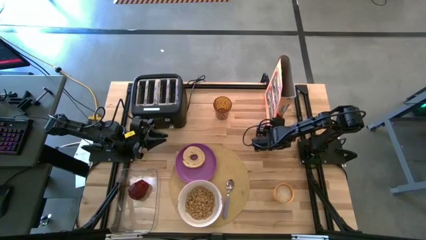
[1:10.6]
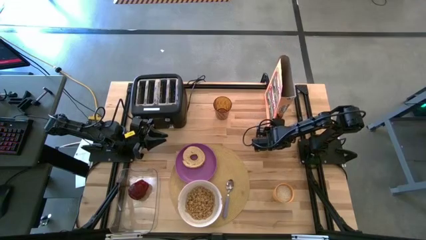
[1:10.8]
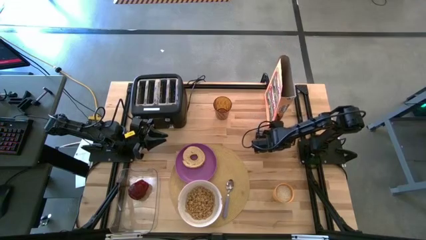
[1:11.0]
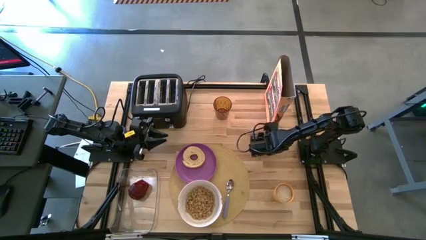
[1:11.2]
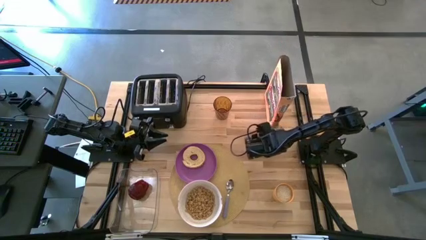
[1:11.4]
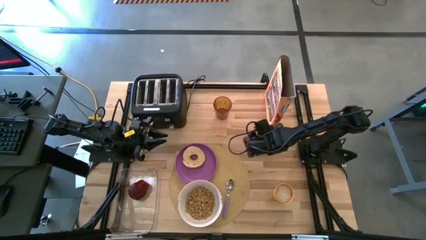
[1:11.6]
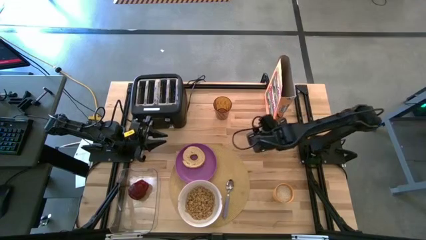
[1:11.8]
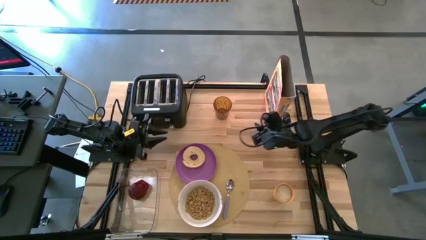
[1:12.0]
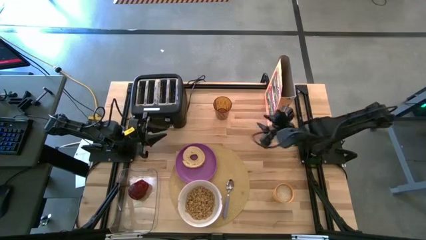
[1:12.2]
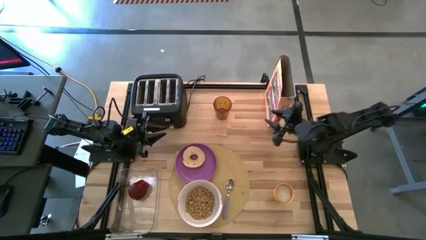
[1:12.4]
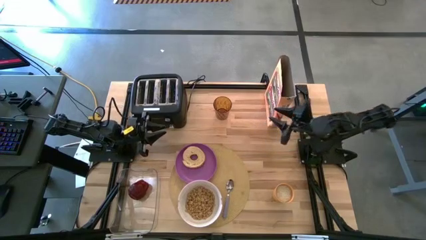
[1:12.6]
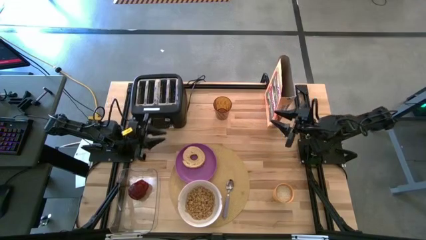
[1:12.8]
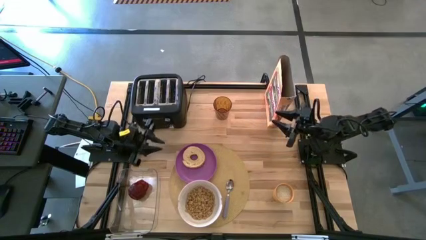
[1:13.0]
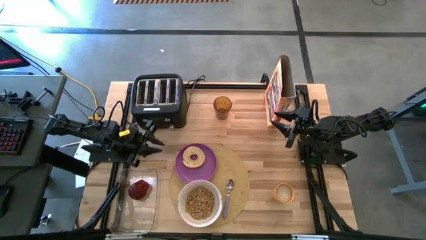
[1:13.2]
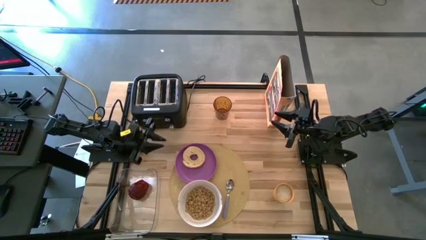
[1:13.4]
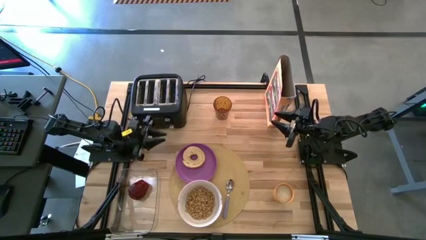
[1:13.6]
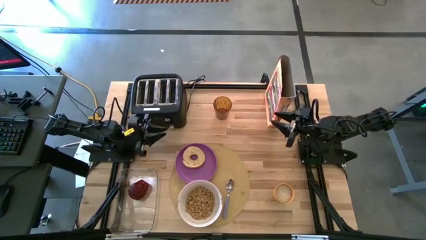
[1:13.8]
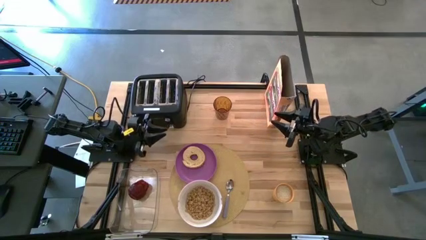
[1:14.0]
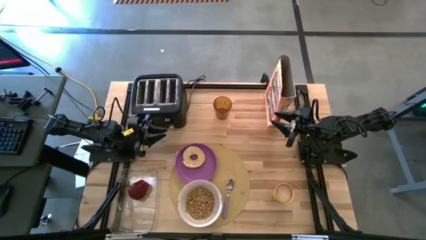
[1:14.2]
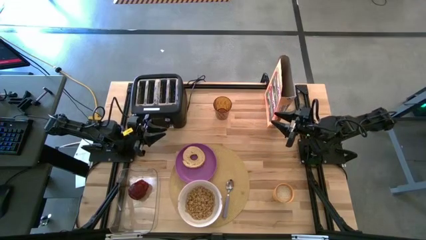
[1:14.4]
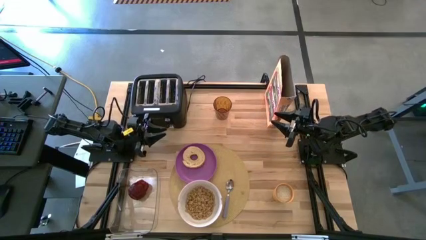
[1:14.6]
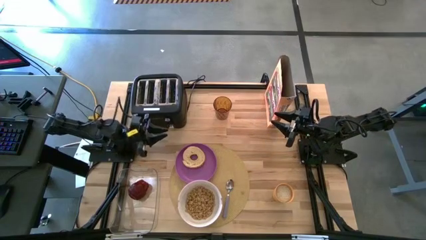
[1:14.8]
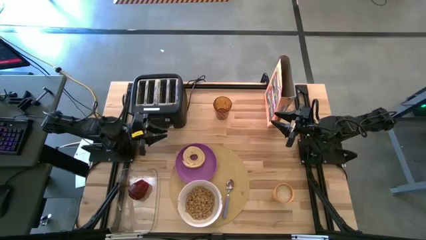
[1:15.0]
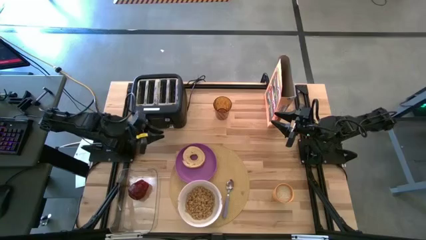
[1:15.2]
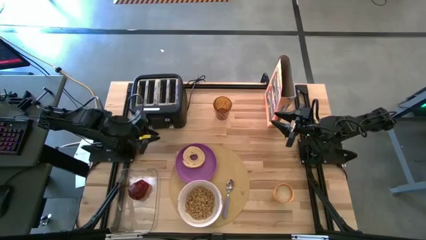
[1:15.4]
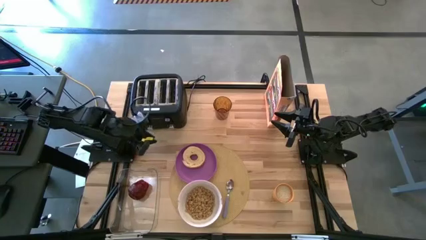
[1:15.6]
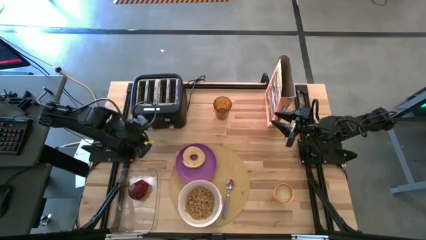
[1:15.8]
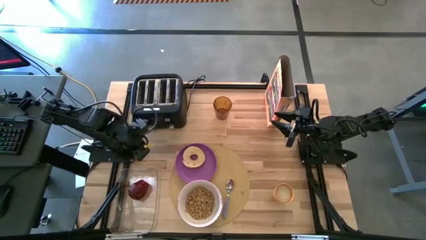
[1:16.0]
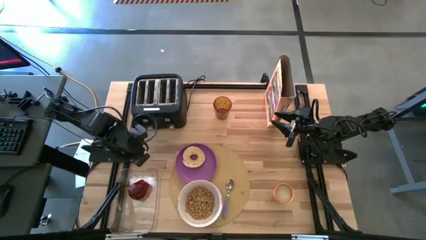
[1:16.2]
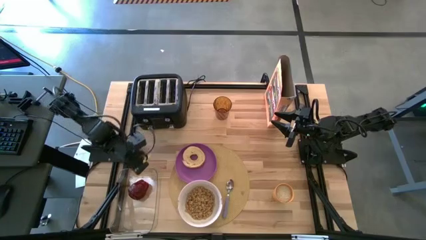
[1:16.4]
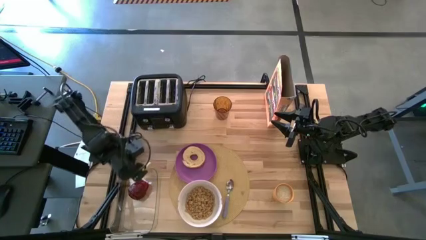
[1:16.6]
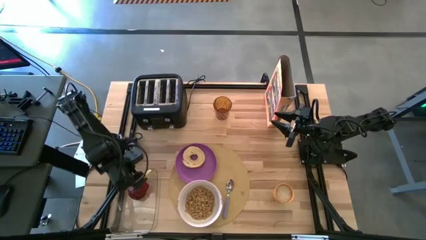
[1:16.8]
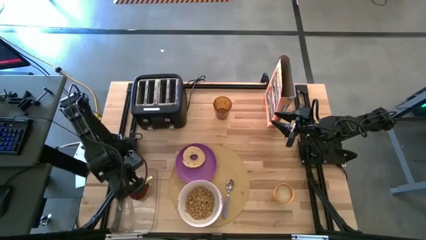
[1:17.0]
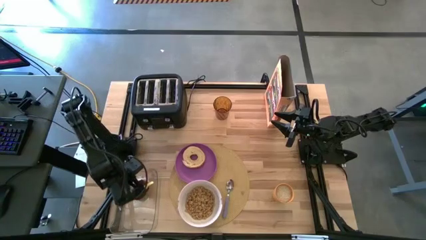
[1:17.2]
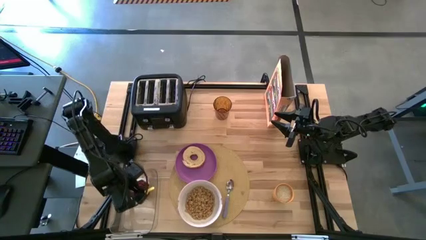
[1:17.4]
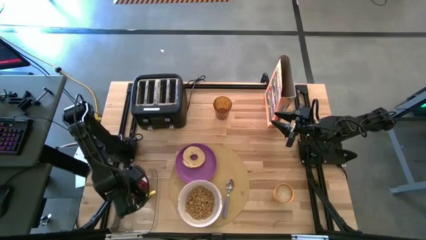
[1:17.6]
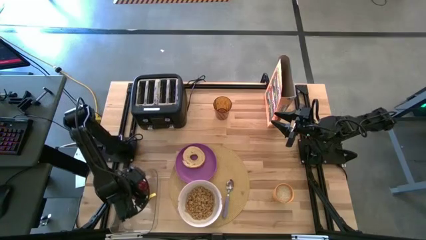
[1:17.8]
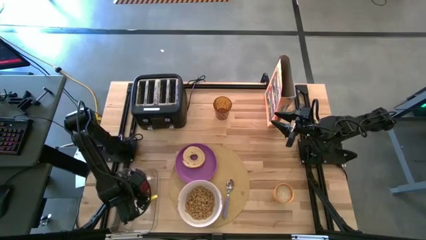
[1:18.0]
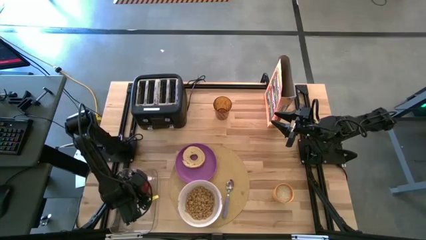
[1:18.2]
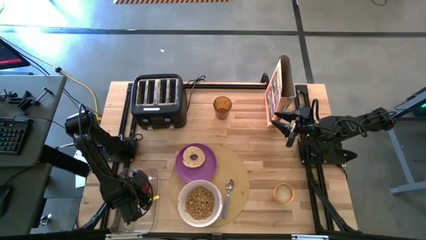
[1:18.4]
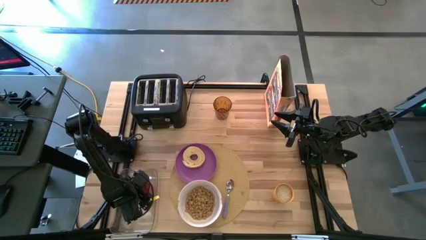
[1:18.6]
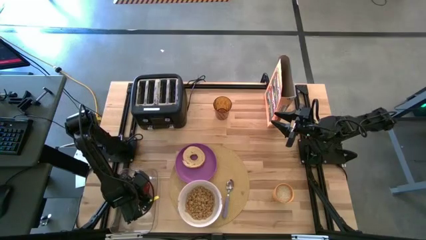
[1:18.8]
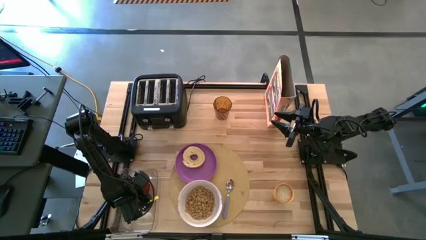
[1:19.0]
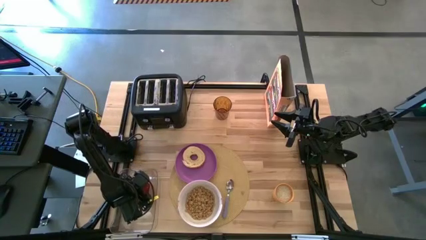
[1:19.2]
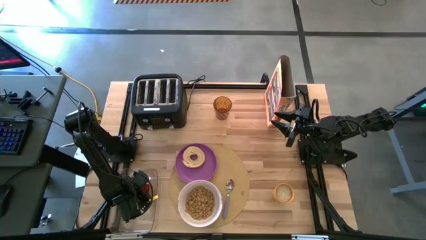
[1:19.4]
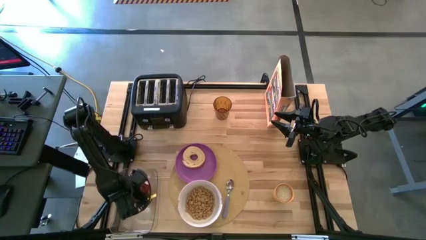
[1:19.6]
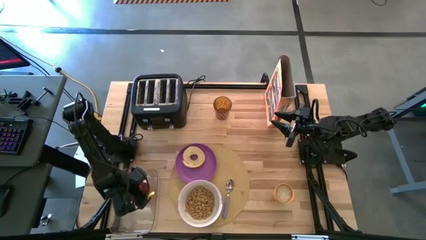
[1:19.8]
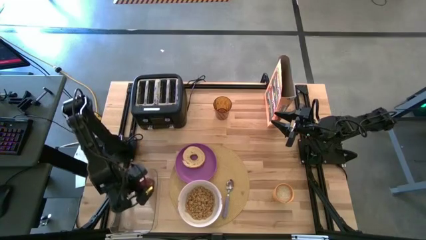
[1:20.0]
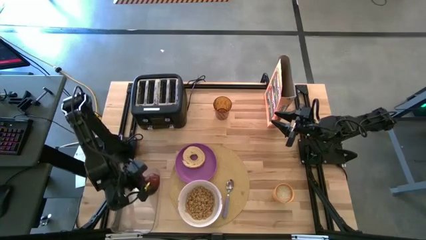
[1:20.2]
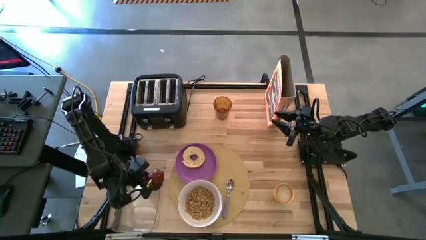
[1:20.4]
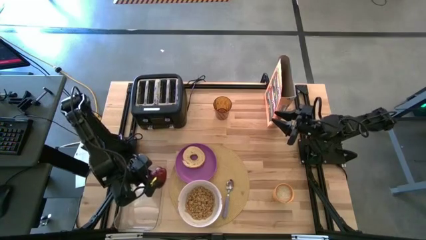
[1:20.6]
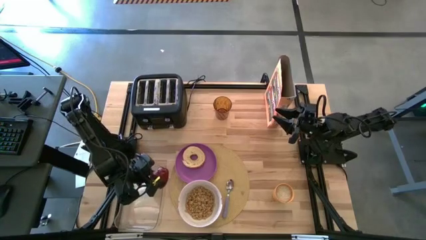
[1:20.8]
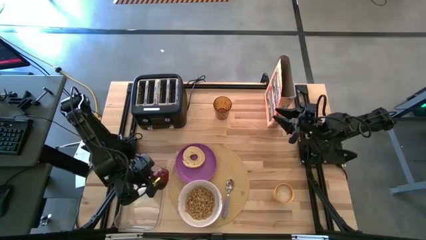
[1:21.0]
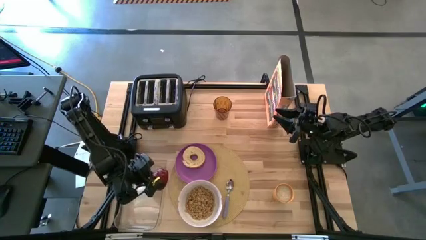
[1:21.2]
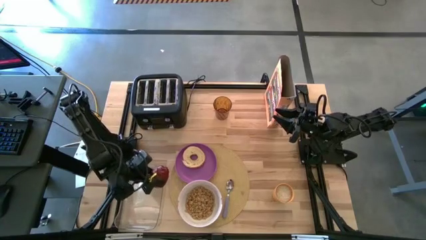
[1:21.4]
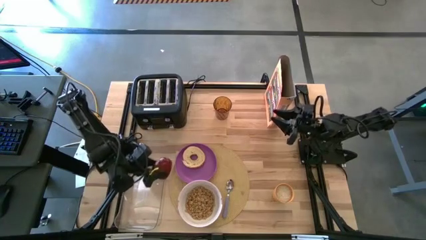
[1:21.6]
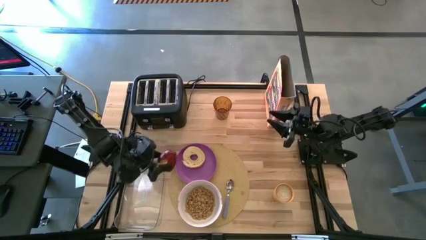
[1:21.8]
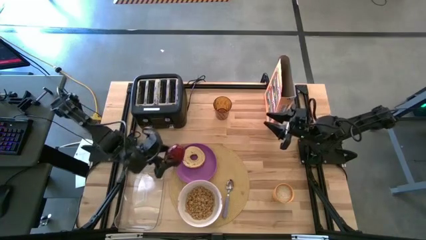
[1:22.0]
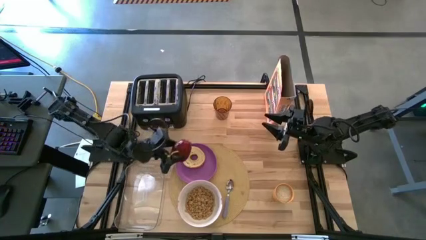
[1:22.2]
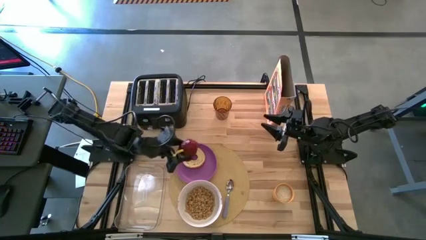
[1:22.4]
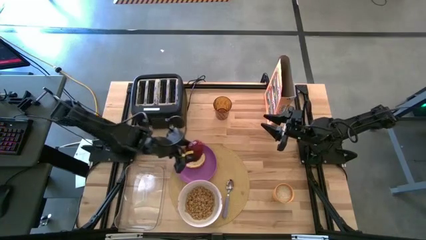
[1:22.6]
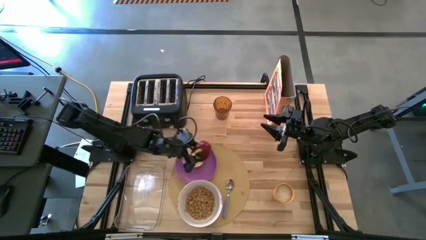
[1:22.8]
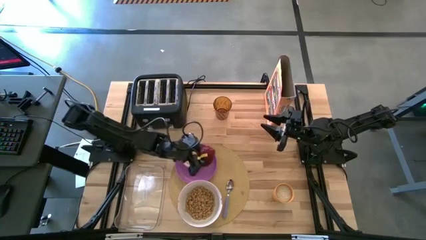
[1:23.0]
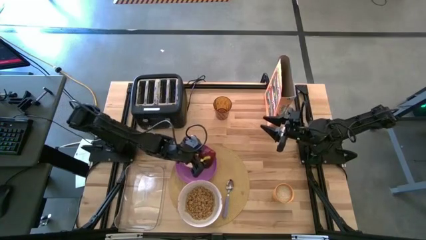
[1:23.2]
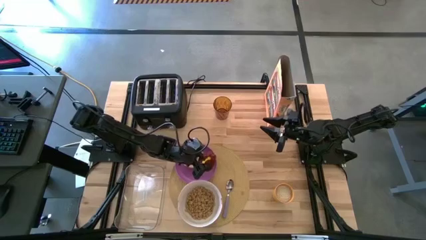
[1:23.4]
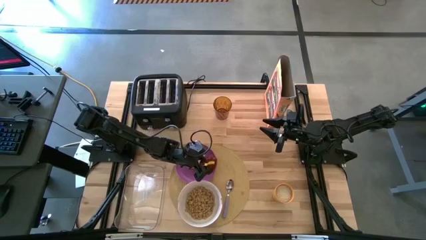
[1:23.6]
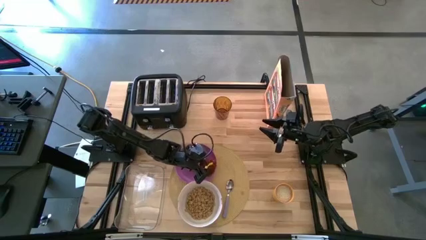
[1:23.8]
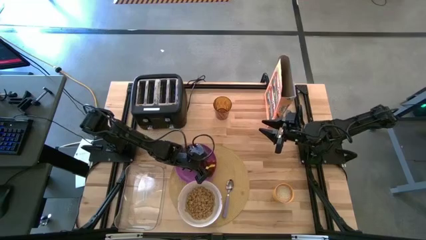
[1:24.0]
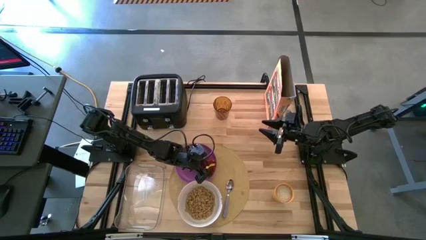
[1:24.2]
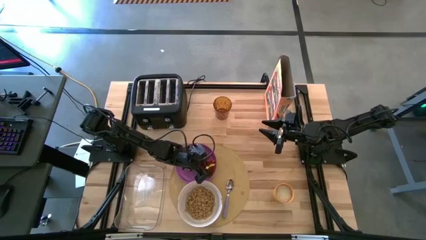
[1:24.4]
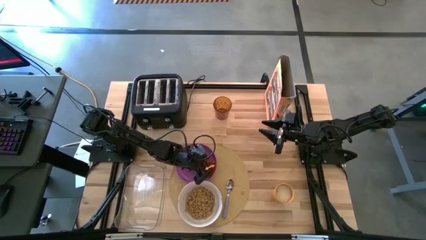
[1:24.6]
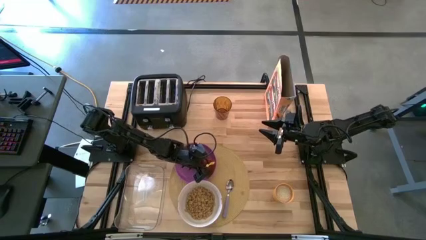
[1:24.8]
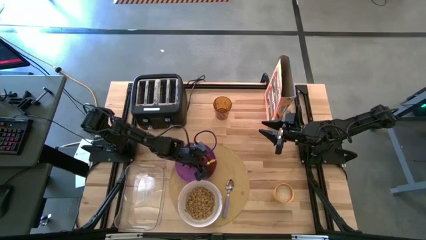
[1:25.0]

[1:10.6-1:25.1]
Task: Arrange a breakfast setting
Put the apple from the transparent bin onto the purple plate

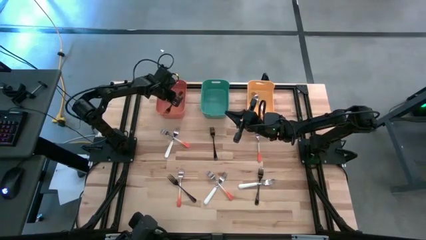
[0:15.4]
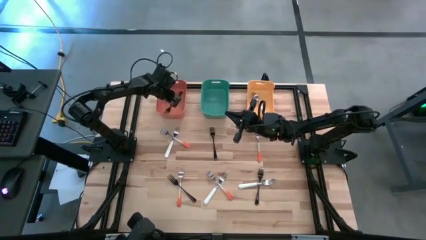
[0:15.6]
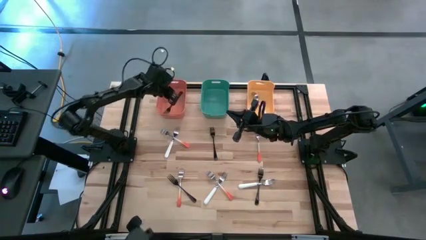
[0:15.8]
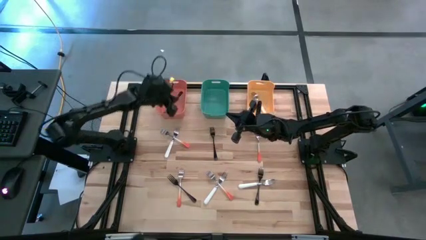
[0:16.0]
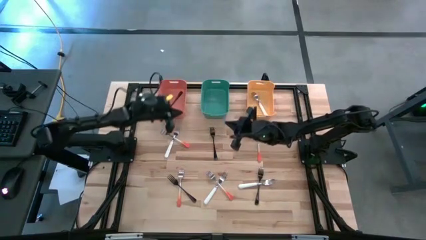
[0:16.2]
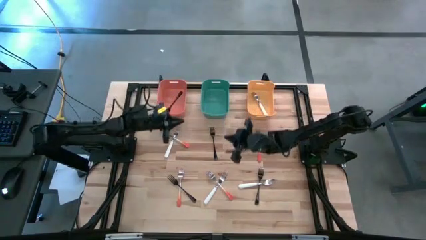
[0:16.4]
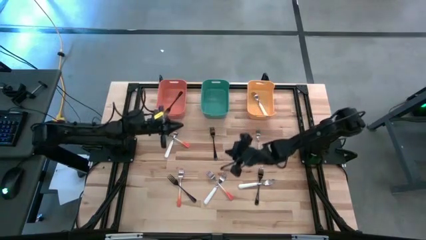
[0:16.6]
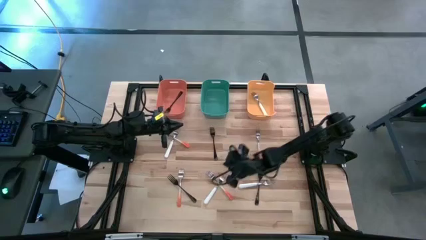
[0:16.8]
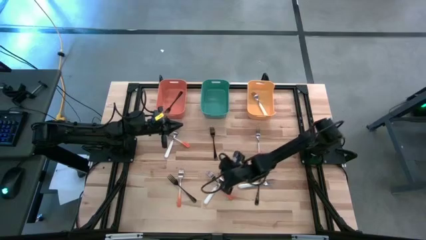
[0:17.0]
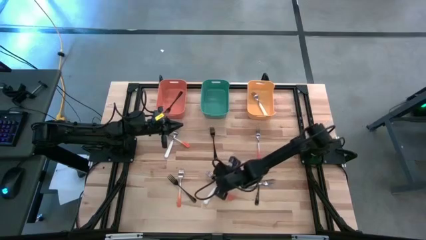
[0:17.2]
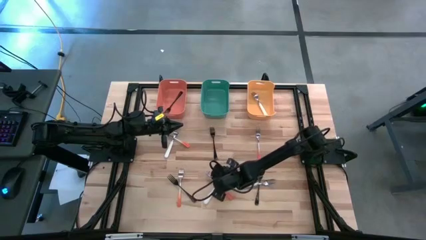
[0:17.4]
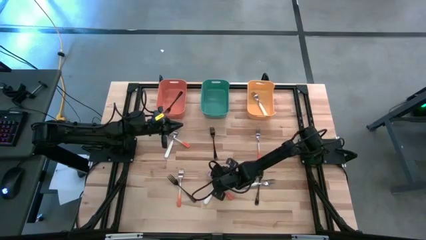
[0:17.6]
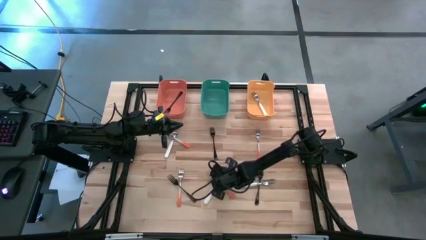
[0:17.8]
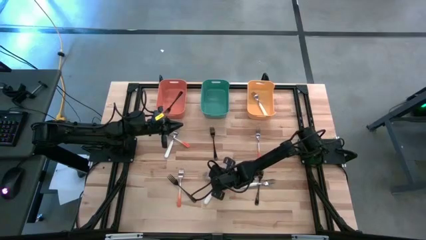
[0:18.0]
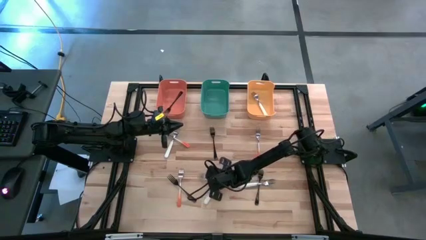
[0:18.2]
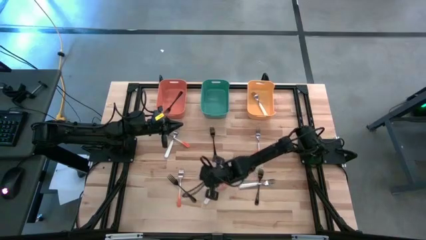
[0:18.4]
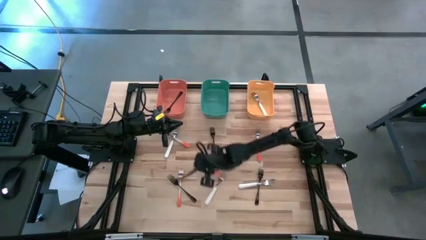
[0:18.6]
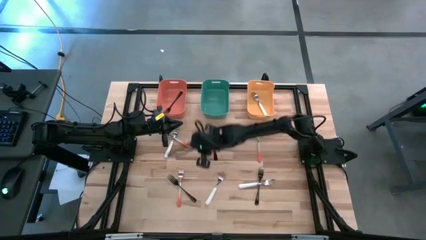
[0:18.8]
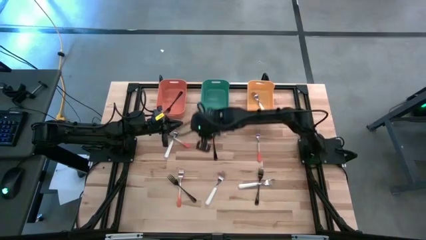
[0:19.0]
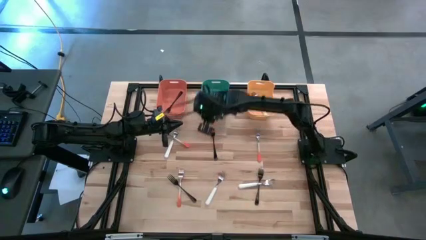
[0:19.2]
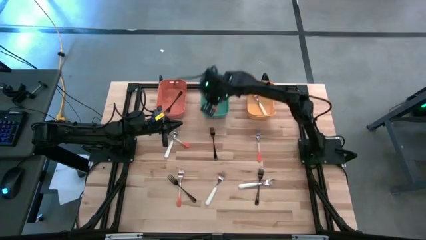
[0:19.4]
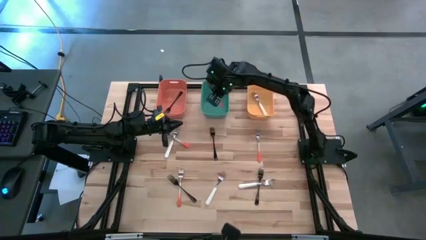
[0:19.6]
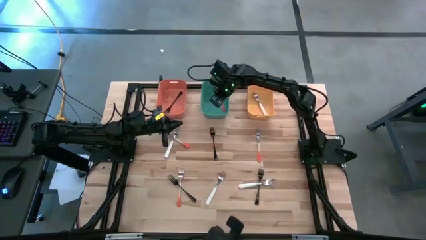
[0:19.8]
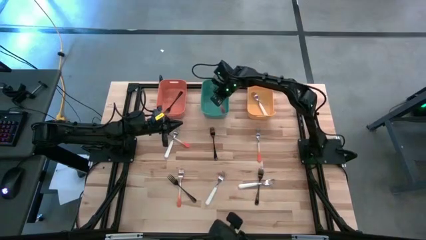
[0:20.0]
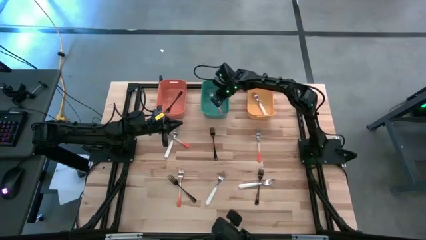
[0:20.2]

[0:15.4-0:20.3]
Task: Sort silverware by color (type)
Put the bottom right orange fork into the green bin
